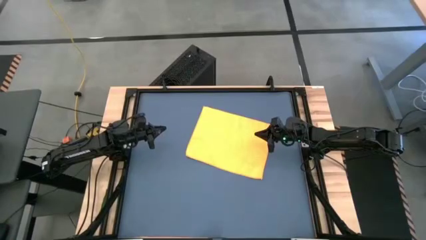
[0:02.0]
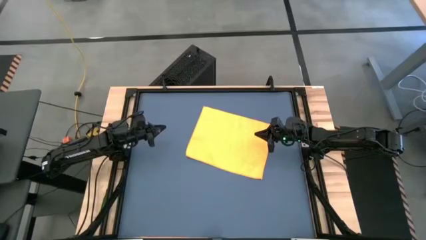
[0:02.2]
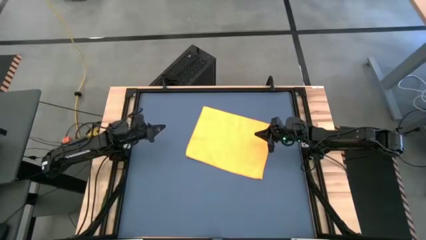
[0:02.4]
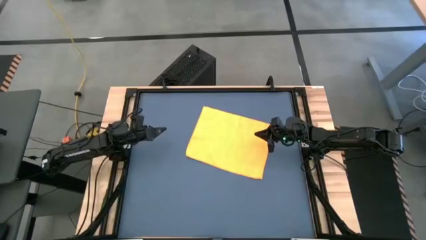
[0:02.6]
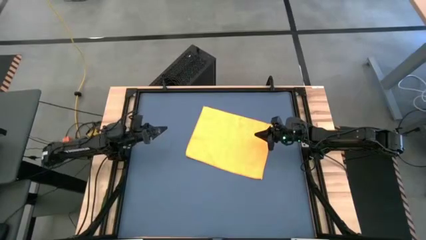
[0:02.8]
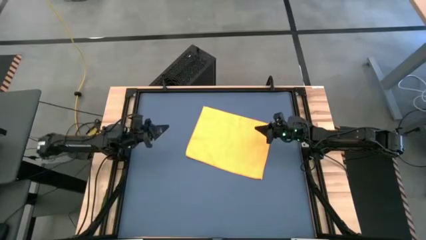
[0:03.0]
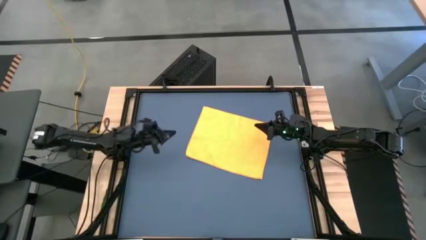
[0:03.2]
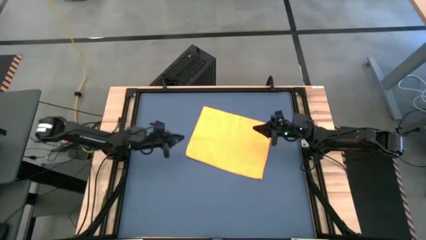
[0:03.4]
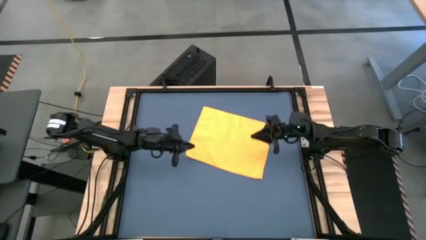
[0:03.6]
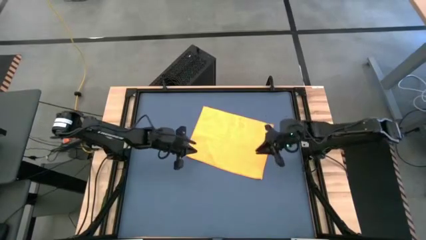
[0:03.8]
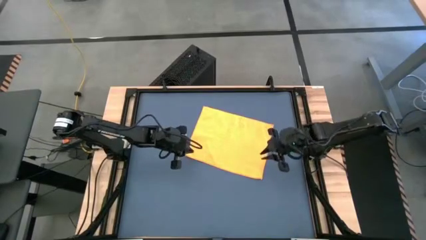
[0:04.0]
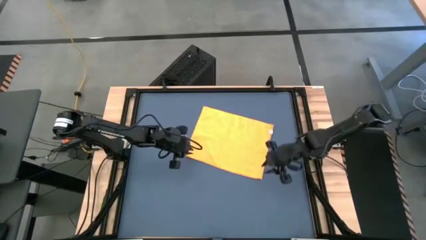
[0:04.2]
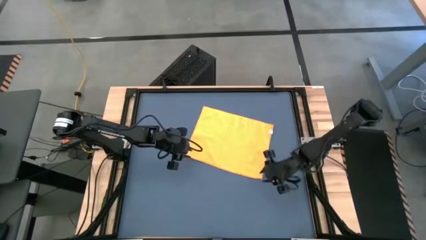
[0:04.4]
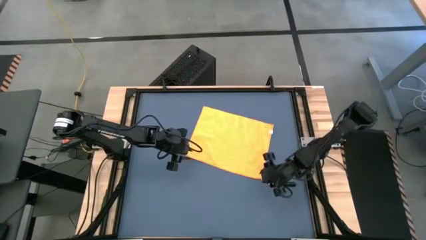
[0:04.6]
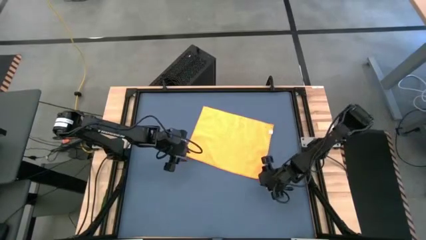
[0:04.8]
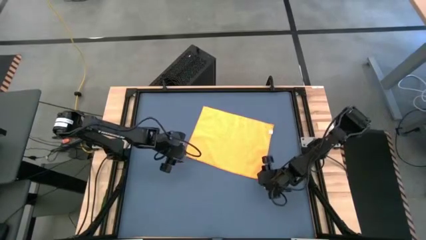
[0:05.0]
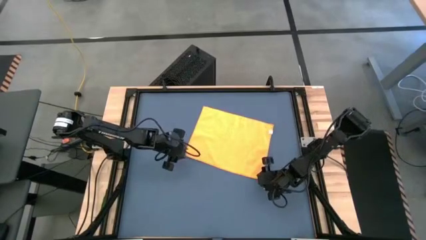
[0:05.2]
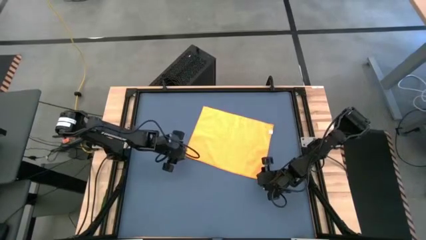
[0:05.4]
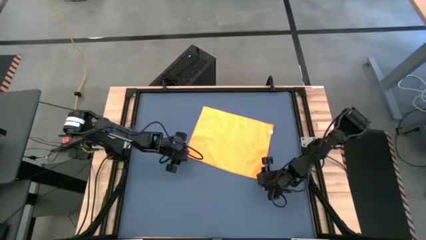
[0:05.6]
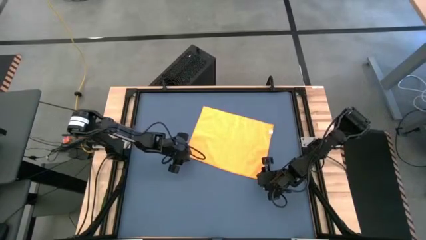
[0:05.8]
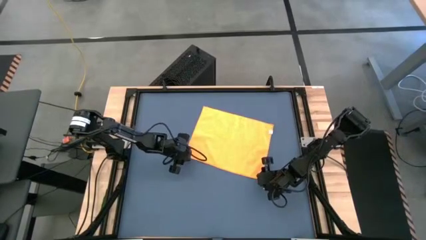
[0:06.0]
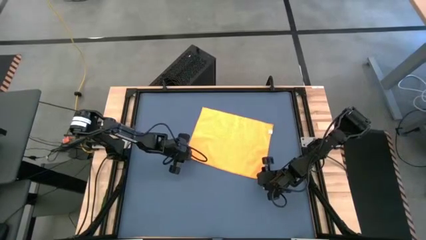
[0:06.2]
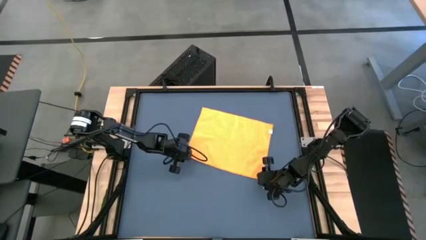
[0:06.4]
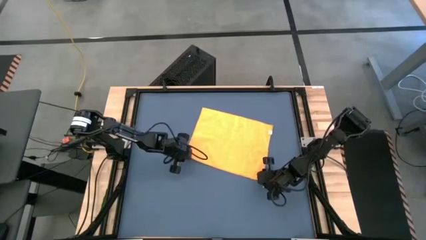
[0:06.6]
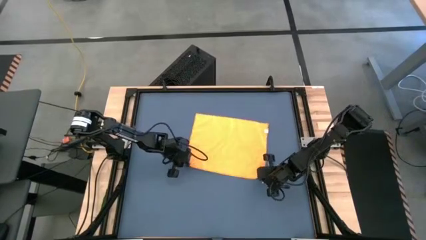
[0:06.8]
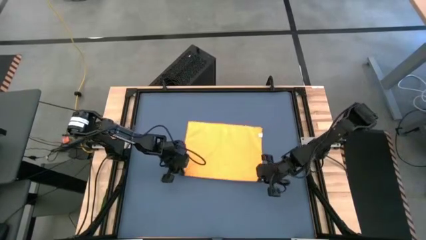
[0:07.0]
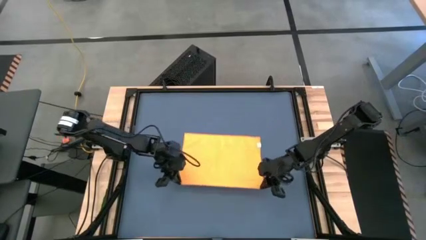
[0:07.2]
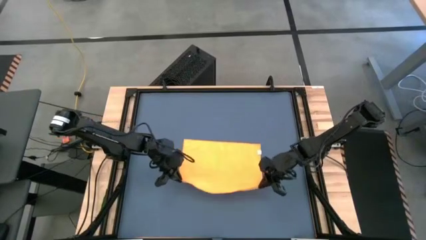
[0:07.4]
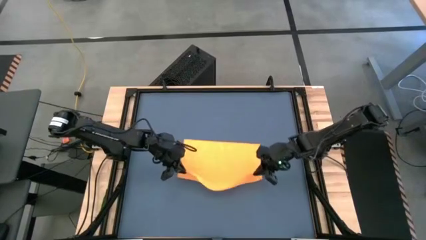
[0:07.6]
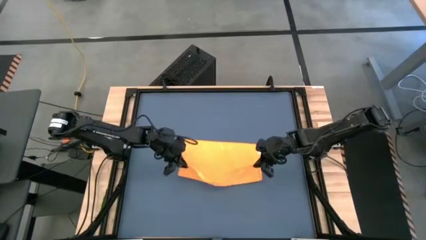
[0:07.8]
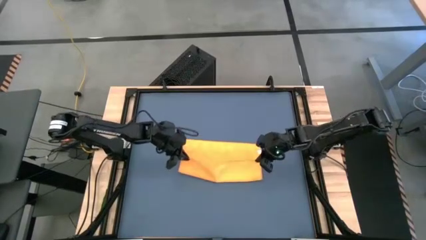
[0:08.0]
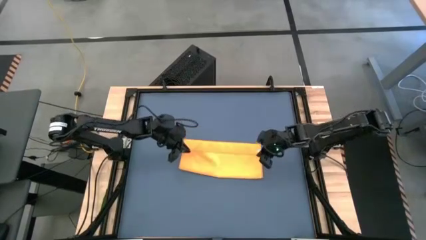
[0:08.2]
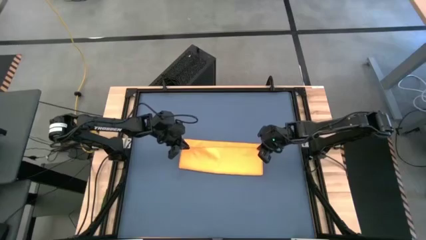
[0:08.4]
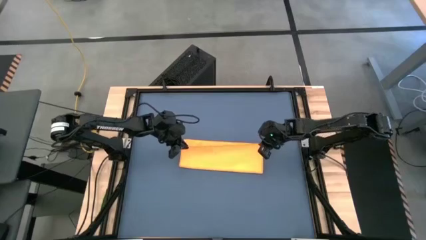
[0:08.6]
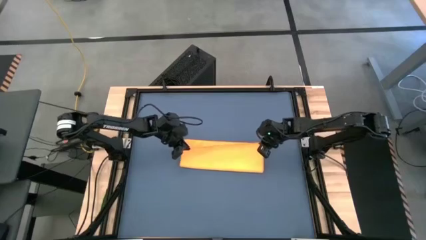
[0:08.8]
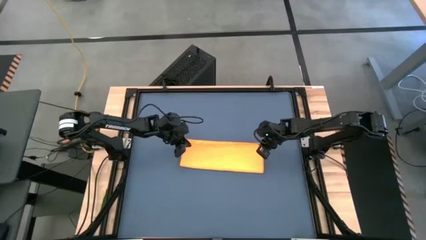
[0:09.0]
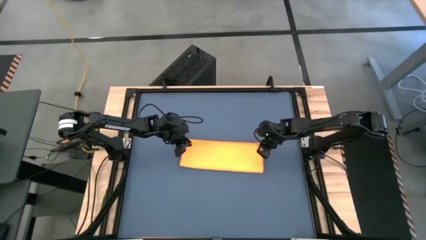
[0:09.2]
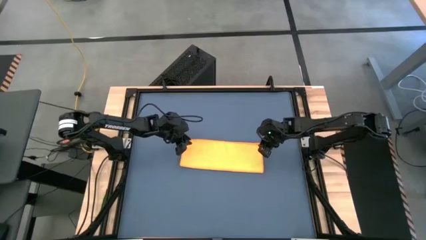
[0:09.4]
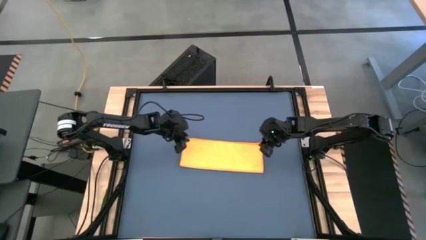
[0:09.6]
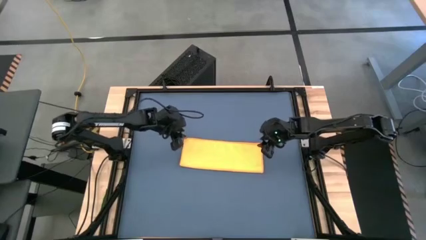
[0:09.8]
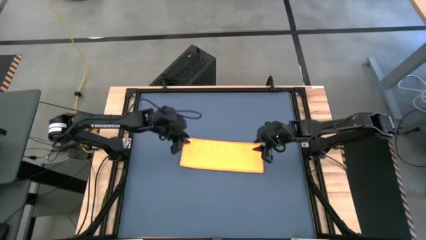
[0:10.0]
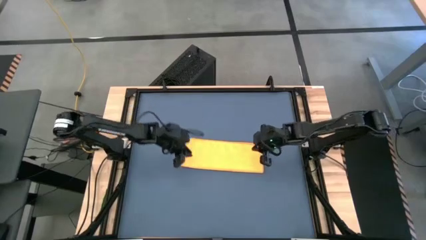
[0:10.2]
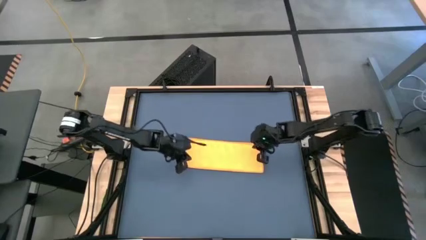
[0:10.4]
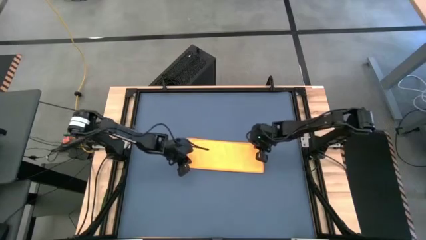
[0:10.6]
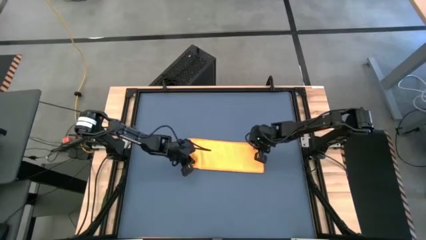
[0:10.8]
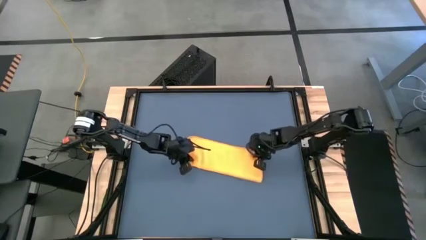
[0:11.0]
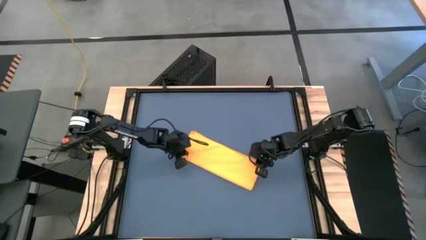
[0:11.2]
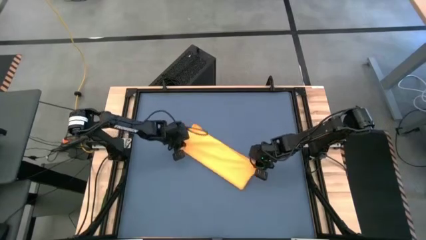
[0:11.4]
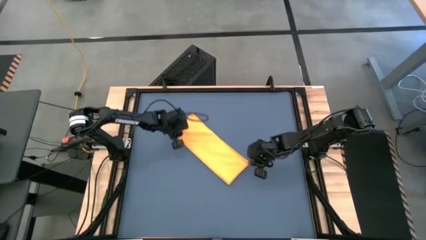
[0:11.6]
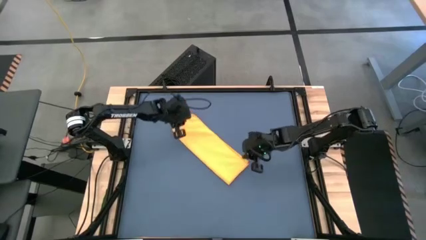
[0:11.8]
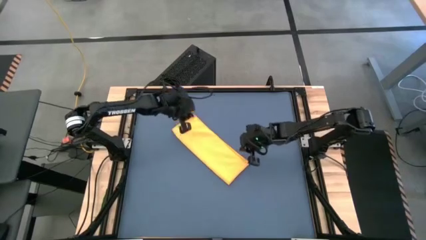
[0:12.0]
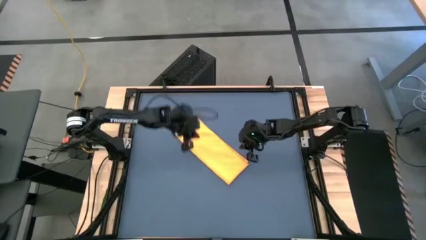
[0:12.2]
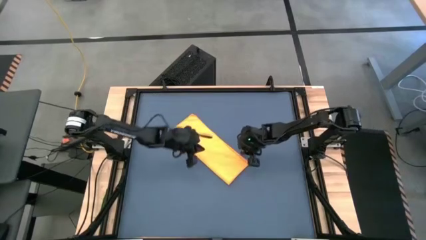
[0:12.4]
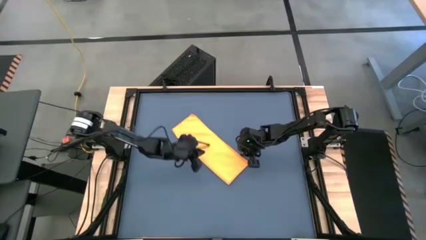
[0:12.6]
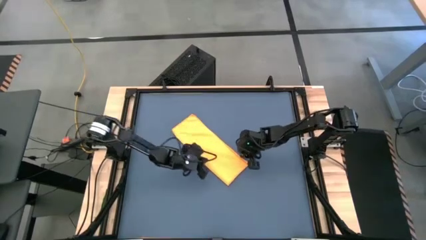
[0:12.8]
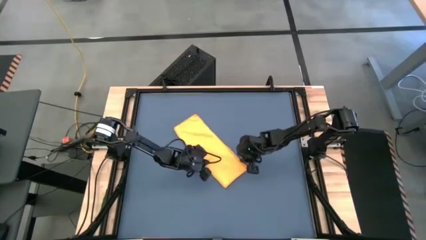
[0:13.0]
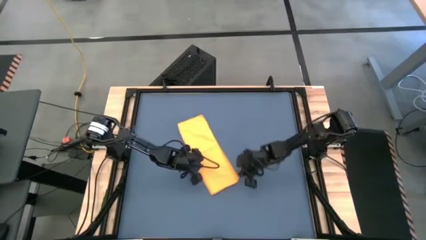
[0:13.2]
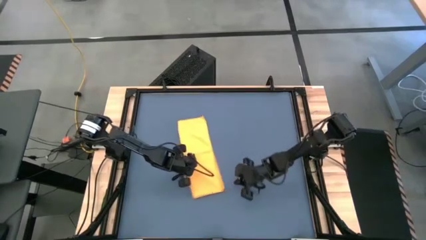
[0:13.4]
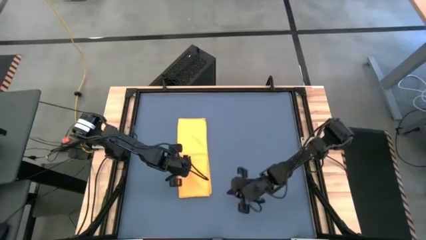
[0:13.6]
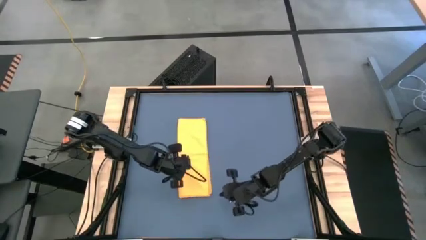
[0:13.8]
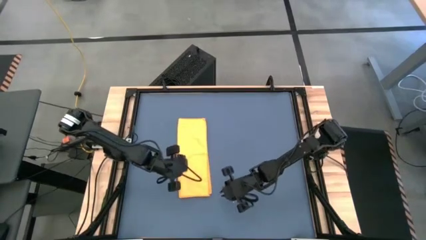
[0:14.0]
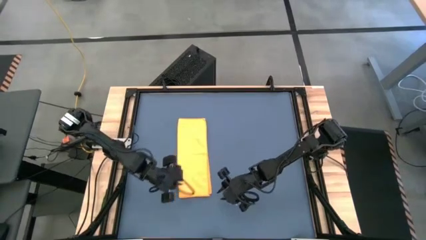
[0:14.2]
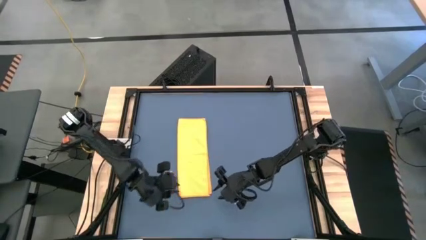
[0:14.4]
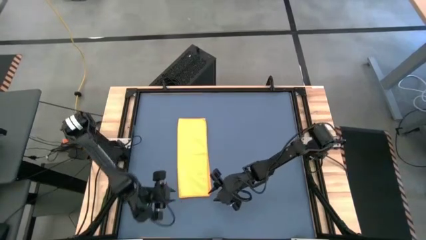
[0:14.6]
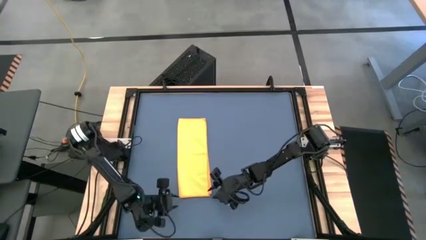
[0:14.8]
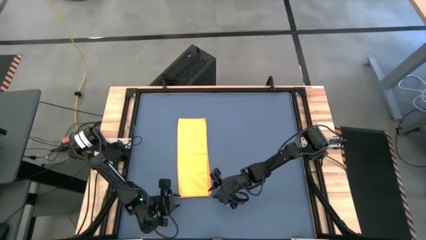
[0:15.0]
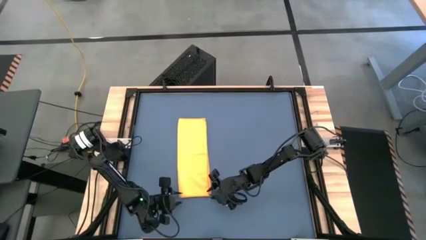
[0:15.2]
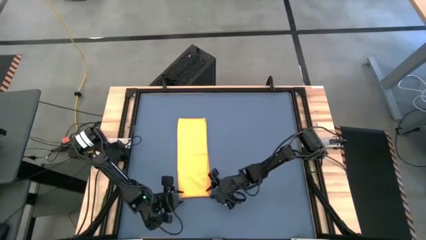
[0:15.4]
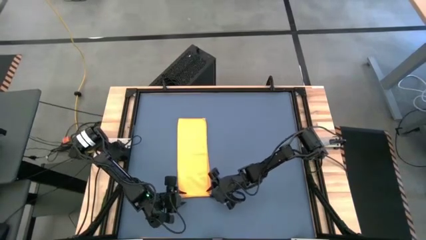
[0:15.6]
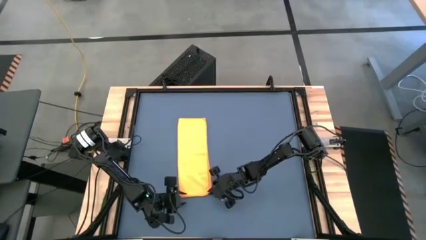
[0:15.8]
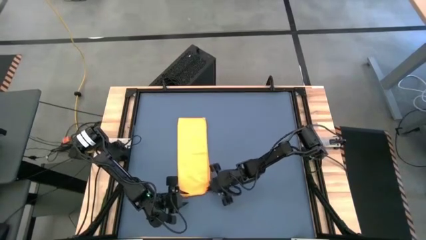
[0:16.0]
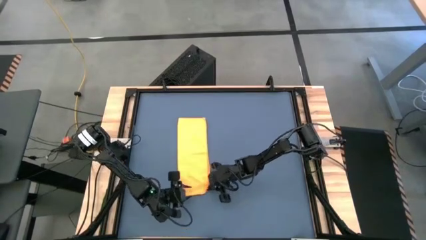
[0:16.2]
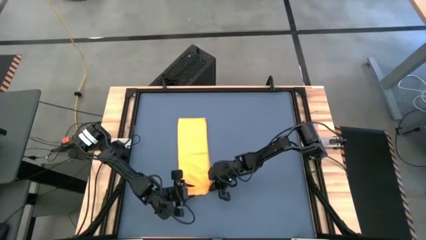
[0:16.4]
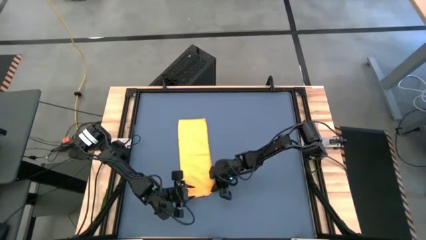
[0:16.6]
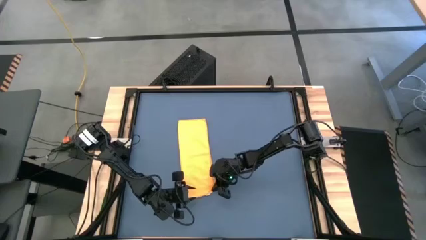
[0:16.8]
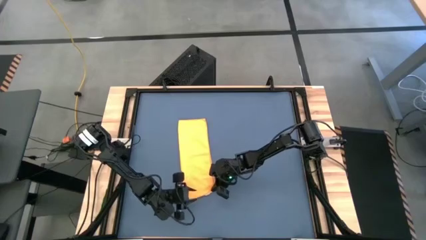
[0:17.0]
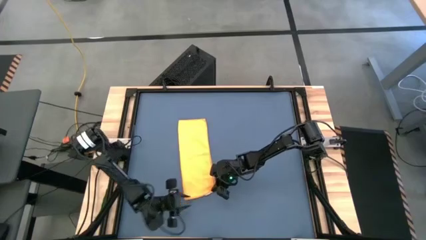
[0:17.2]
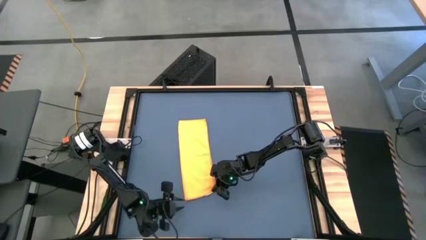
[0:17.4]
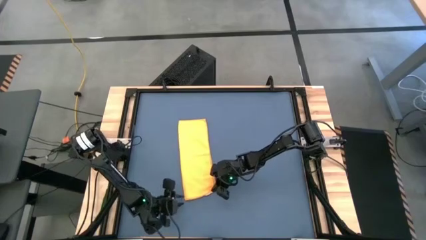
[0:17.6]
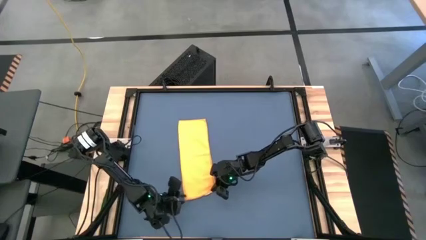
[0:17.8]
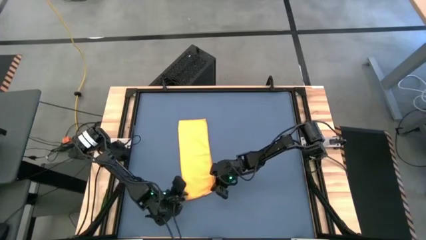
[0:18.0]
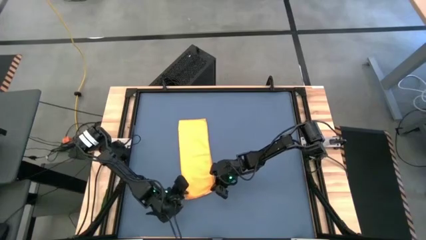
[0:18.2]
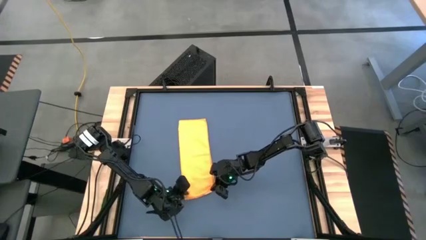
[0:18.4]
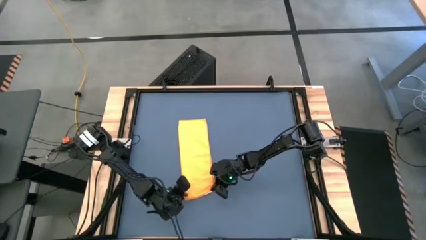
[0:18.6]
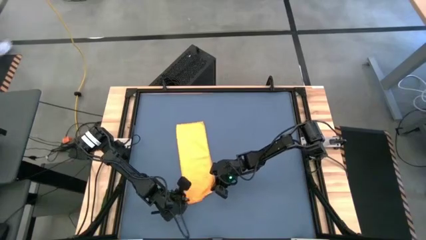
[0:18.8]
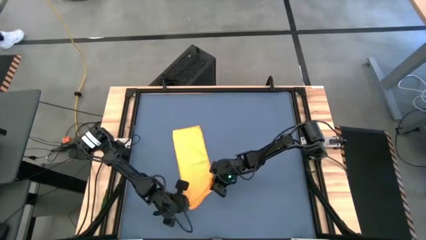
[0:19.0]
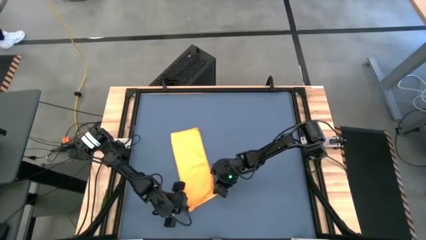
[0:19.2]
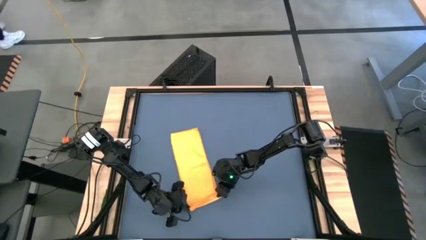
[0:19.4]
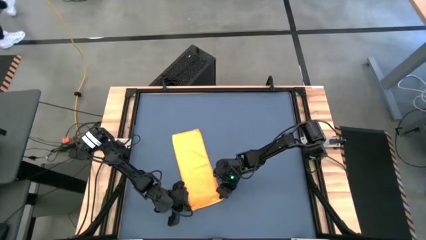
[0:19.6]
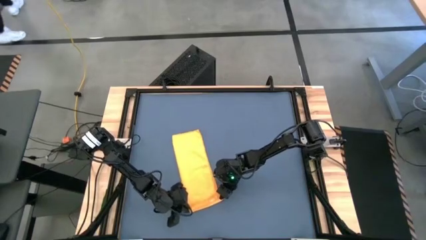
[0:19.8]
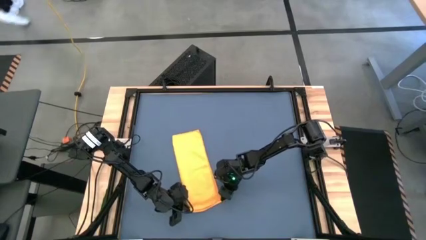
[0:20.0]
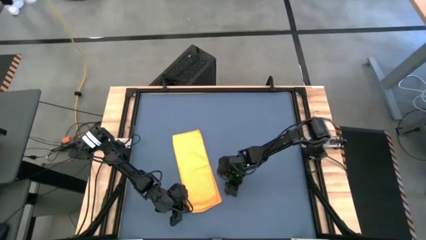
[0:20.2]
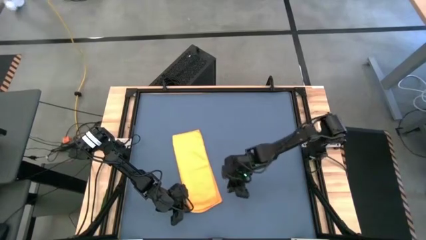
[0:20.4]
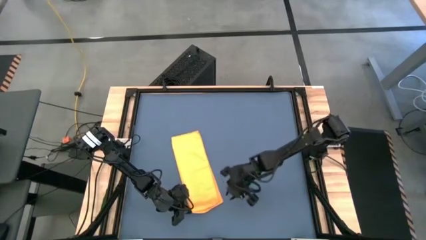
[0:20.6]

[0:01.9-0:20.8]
Task: Roll towel
Roll the yellow microfiber towel
